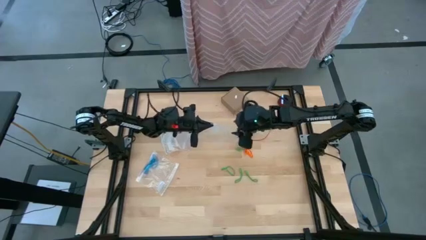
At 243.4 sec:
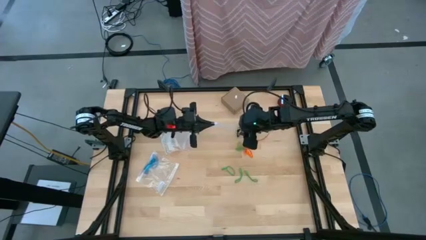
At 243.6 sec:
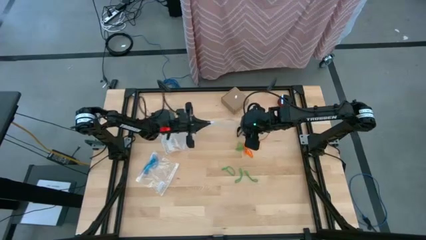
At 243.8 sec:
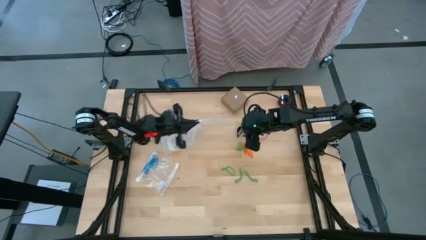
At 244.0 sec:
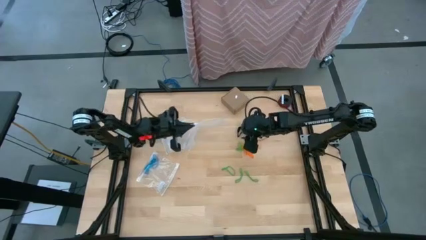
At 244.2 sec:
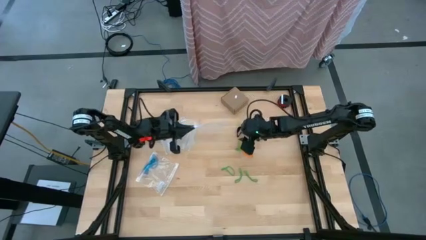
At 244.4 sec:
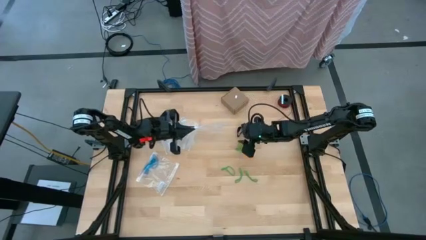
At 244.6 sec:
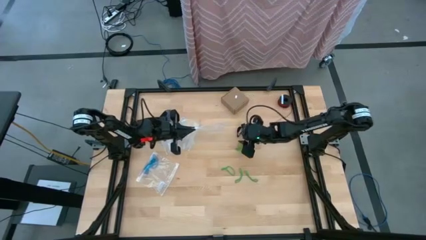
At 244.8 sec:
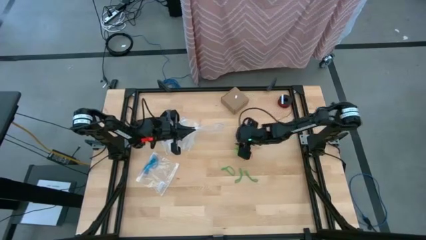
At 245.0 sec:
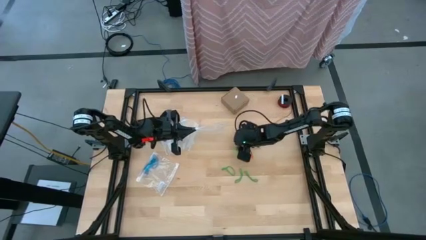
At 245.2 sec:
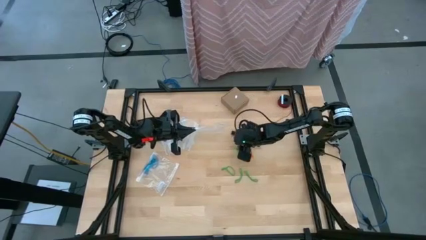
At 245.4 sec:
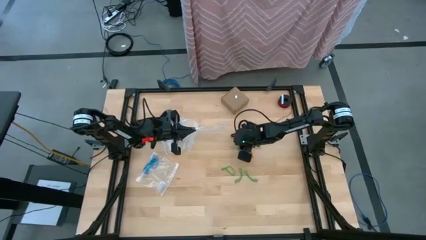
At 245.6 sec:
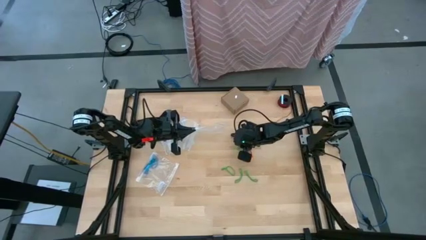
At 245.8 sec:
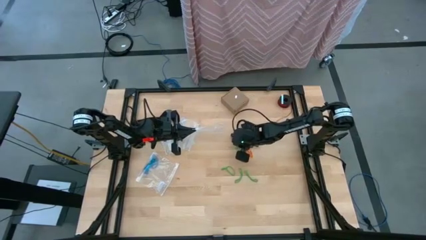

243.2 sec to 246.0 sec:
Task: Sort rubber bands
Put the green rubber band into the transparent zip bag

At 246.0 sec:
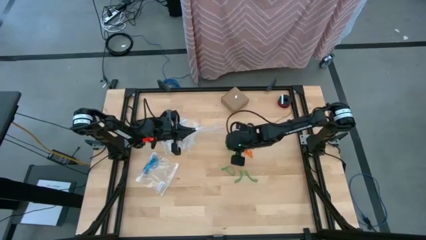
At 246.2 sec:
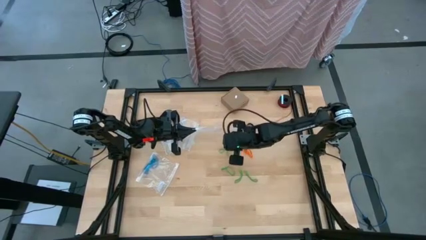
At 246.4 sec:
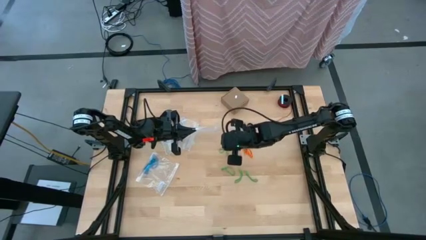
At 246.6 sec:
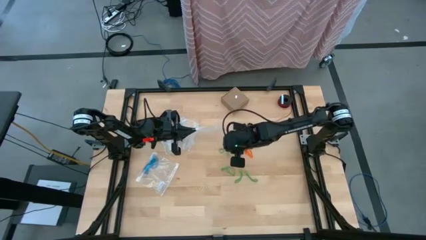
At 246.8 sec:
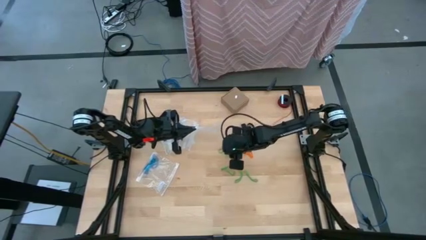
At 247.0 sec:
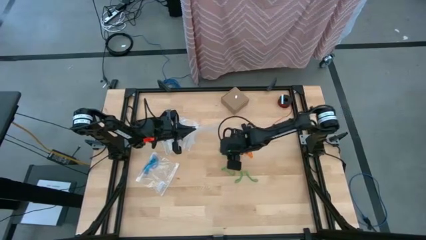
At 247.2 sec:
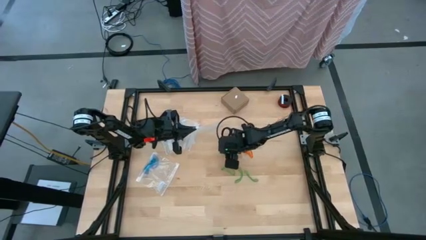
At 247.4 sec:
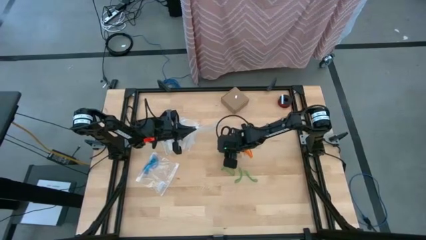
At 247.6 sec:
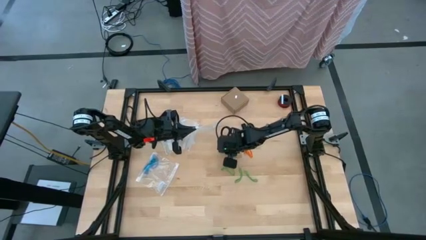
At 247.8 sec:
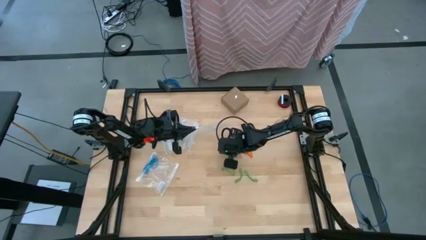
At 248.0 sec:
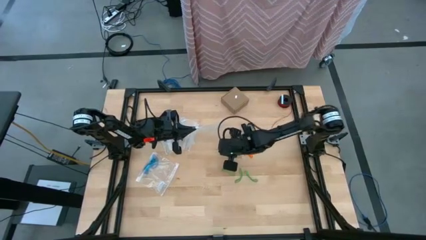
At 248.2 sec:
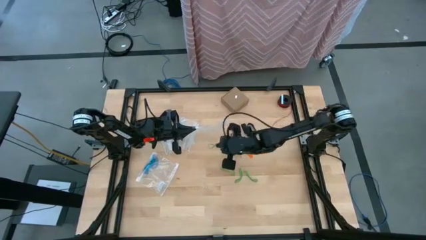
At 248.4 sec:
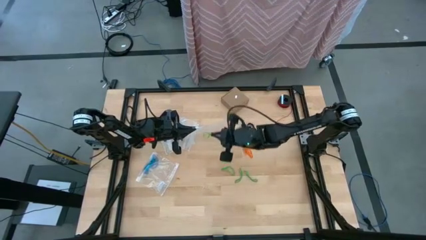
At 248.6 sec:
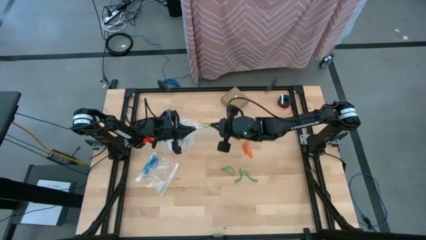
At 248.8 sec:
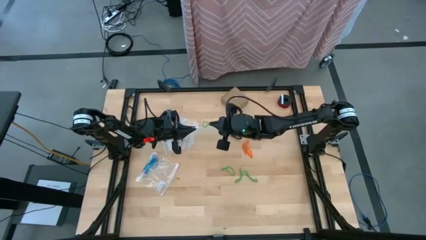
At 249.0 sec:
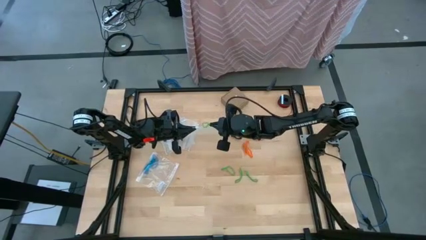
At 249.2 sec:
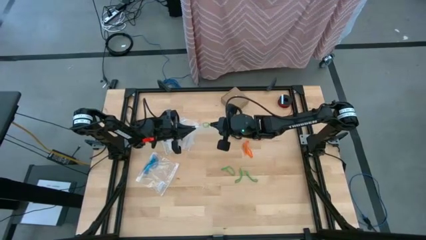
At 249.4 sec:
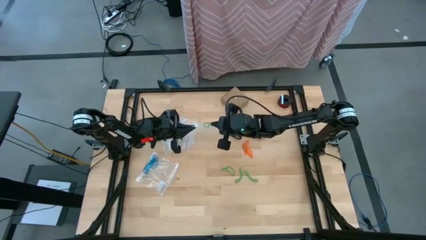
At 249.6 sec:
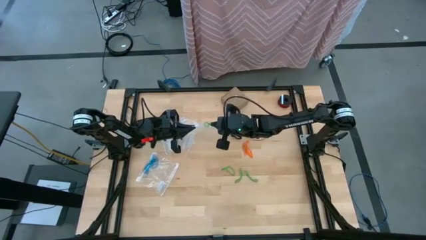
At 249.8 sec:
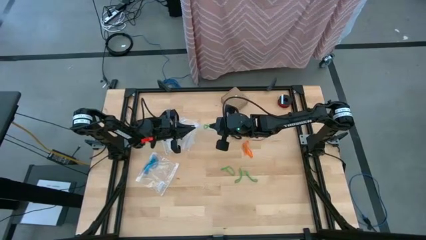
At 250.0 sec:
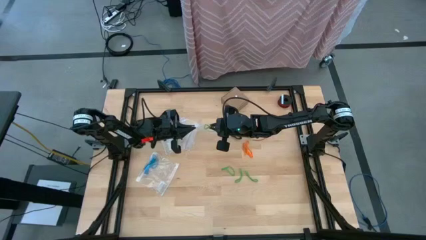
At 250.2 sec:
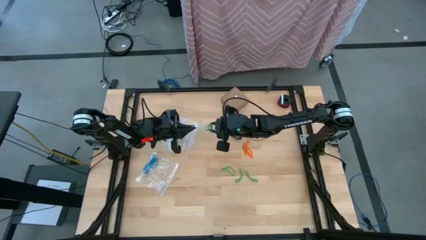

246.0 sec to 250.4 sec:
Put the green rubber band into the transparent zip bag

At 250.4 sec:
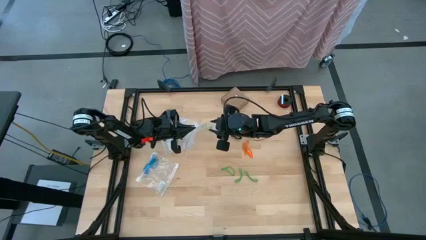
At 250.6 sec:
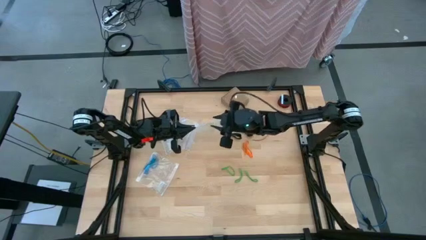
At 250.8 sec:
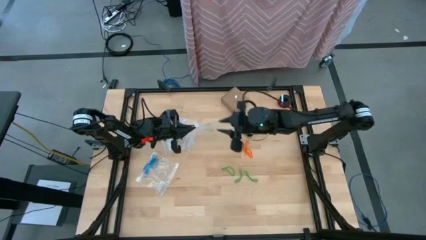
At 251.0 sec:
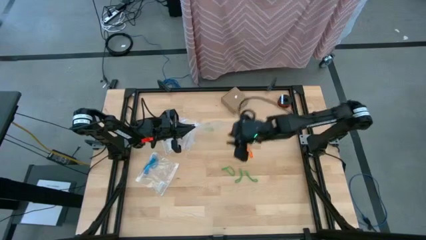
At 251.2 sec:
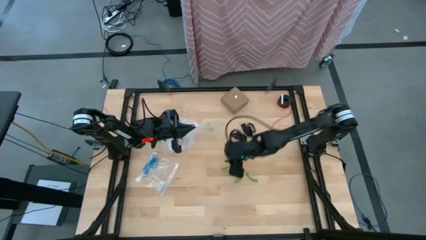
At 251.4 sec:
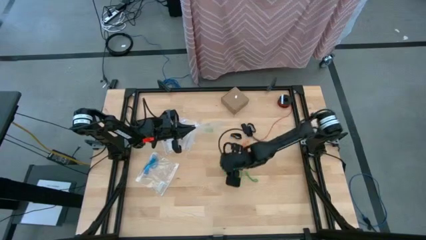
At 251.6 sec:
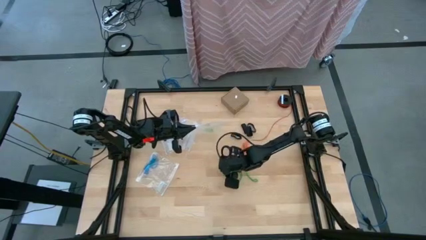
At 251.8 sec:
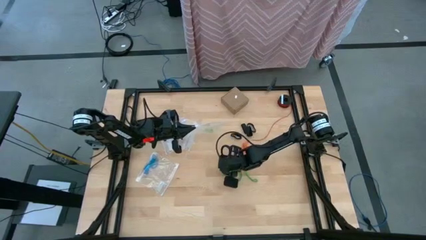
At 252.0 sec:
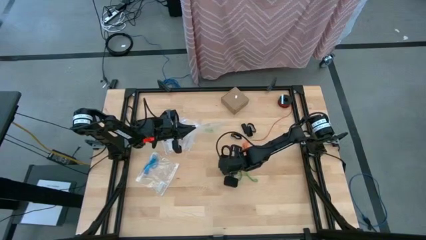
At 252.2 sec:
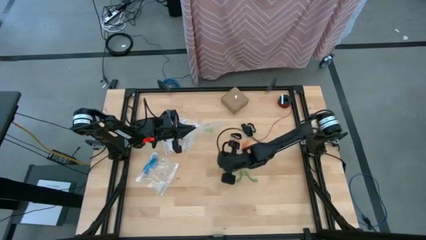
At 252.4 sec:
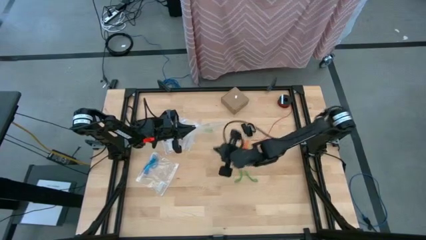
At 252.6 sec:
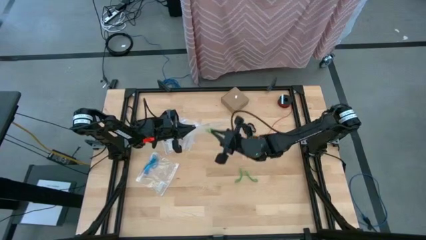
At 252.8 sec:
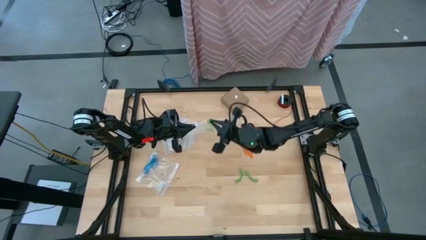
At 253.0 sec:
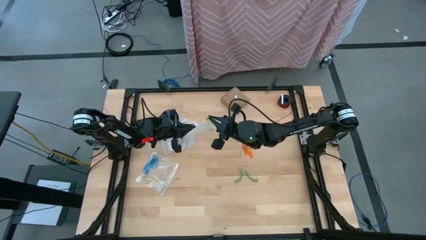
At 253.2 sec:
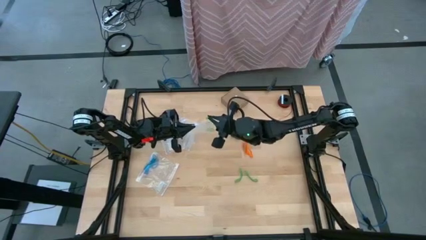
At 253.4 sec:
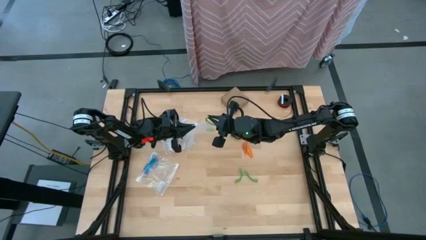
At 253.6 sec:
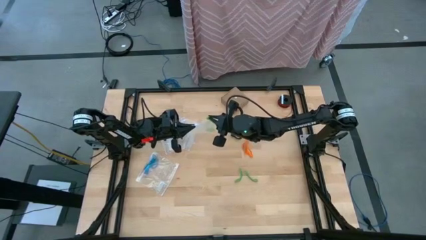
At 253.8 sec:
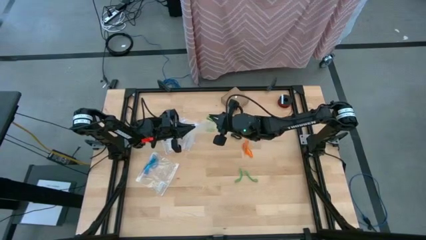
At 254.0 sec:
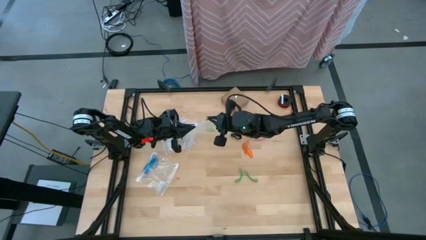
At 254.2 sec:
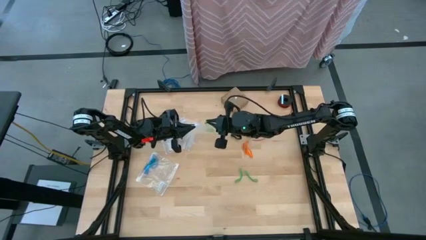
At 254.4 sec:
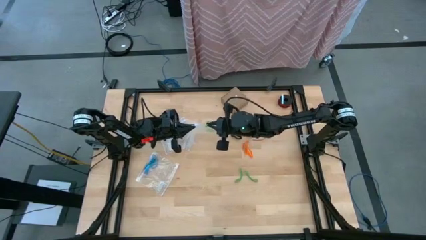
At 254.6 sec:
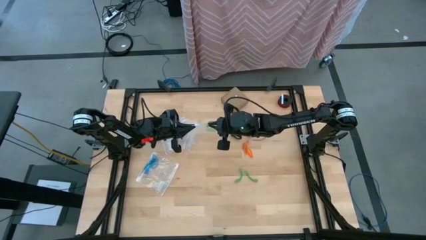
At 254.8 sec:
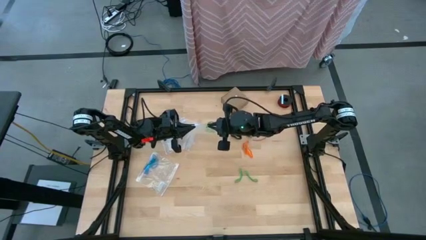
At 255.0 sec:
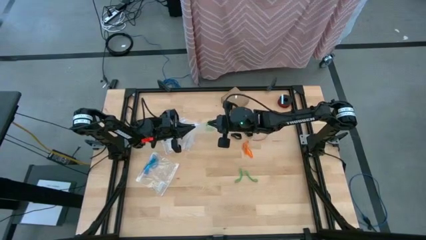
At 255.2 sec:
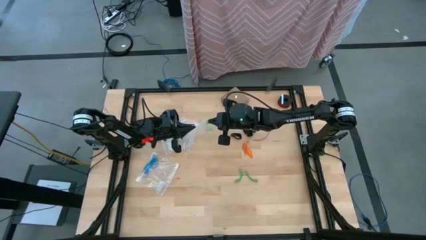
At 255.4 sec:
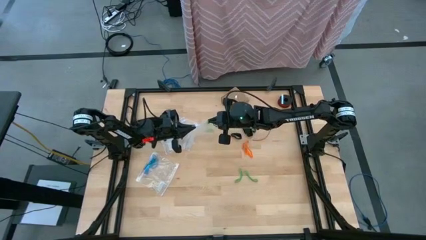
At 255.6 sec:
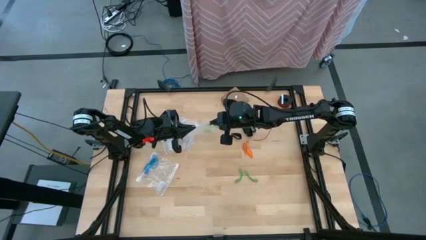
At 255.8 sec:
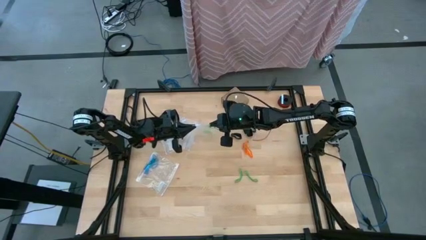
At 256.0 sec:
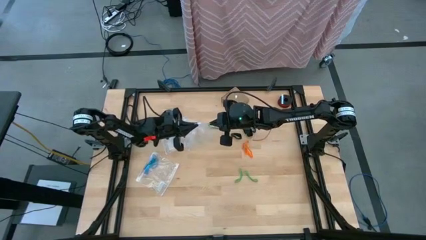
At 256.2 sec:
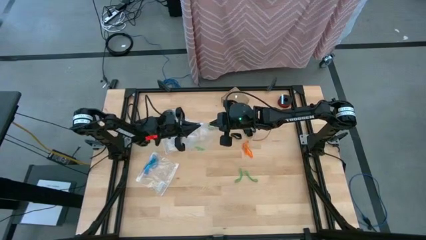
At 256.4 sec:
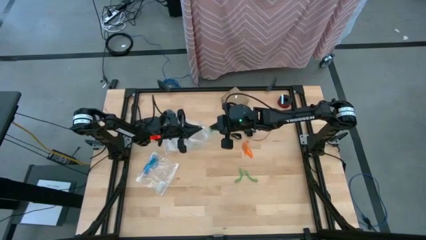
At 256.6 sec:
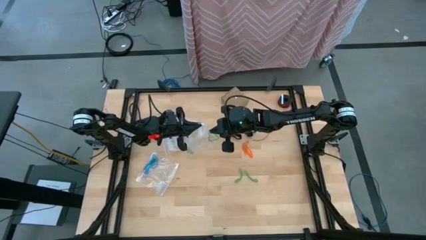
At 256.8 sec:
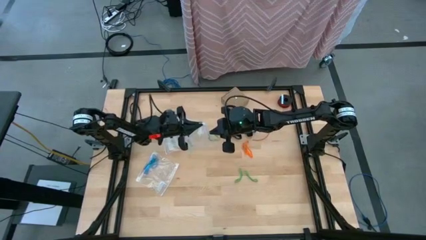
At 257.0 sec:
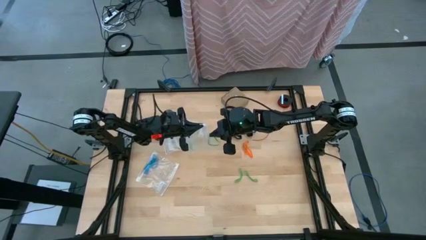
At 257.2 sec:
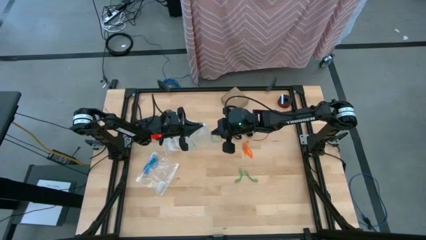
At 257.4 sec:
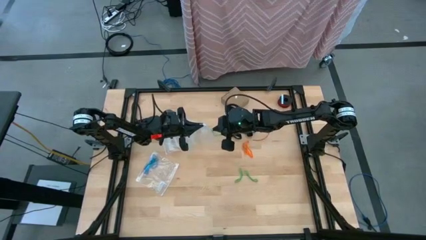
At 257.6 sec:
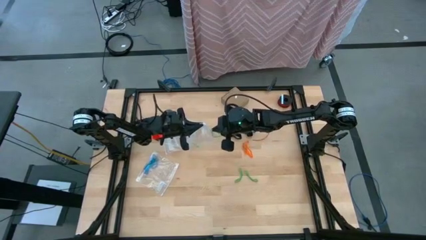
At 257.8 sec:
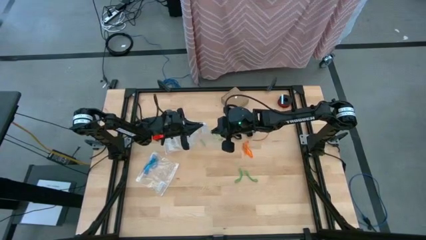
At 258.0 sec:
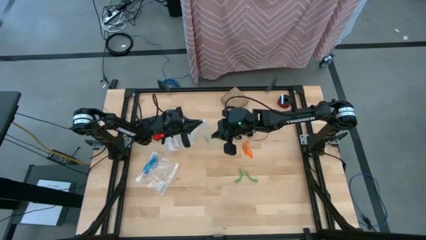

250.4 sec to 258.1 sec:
Put the green rubber band into the transparent zip bag

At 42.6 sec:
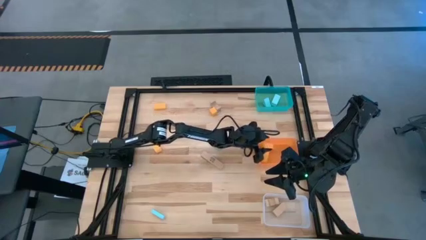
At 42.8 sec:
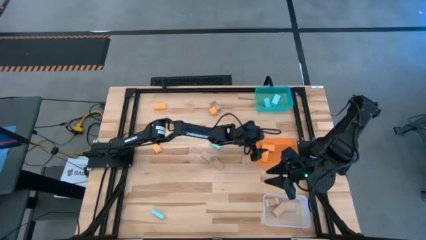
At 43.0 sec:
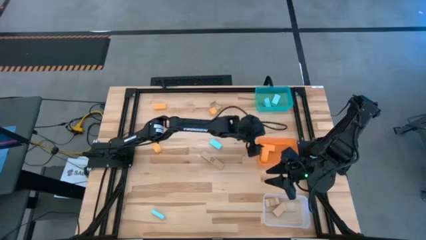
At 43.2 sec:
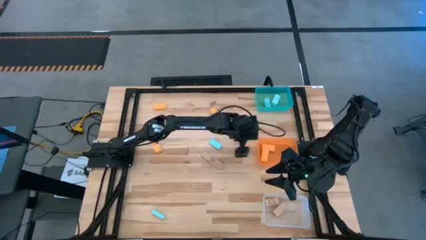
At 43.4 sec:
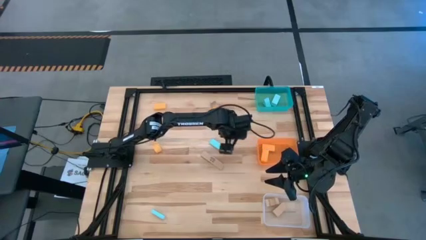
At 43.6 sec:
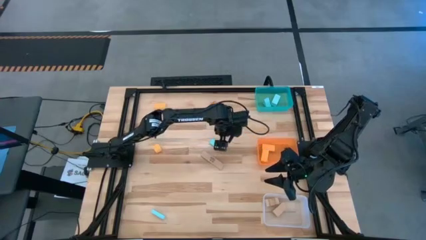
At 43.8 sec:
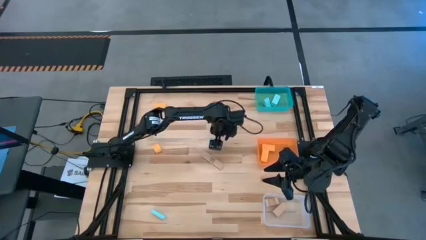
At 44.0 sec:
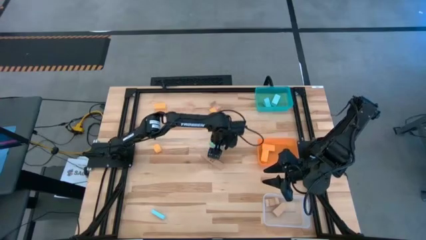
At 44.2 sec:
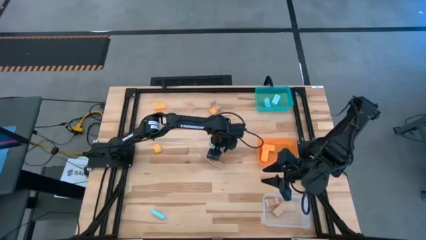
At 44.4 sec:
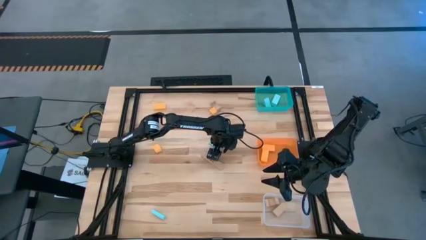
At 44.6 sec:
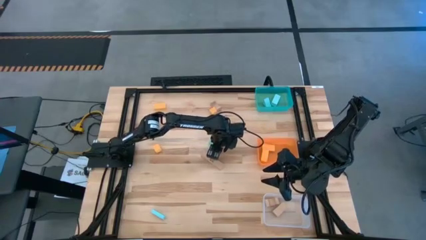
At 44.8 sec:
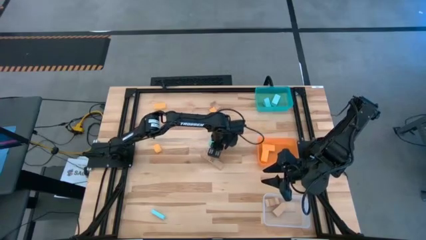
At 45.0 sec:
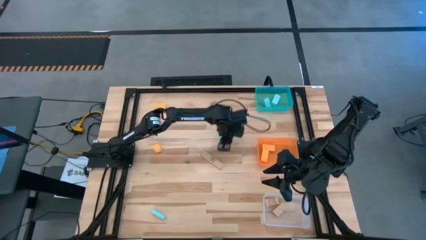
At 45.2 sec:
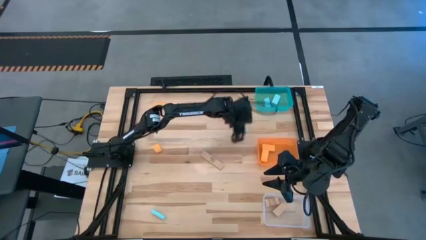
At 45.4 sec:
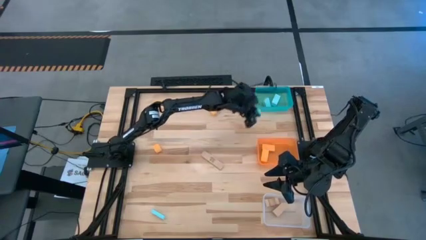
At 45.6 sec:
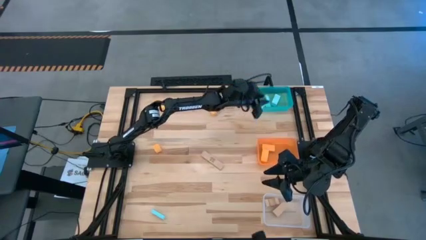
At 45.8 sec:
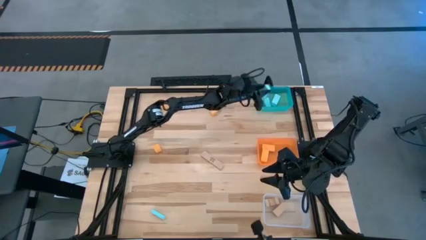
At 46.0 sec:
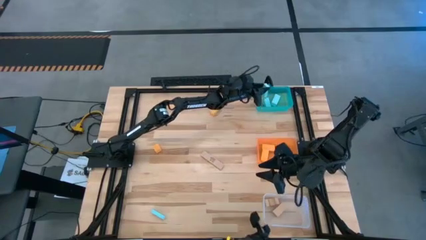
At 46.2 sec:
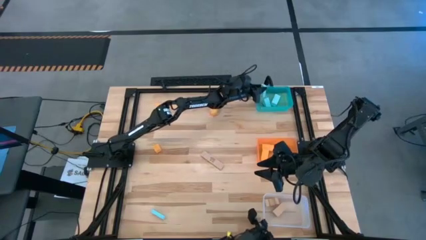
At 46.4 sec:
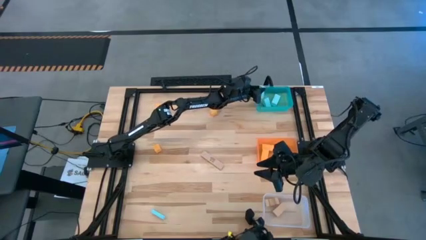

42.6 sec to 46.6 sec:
Task: Sort & place blocks by color
Put the blue block into the blue bin
